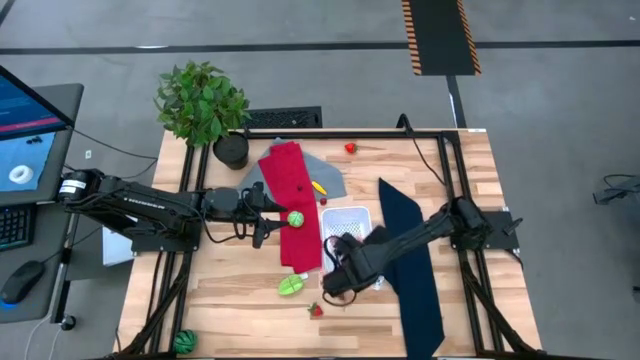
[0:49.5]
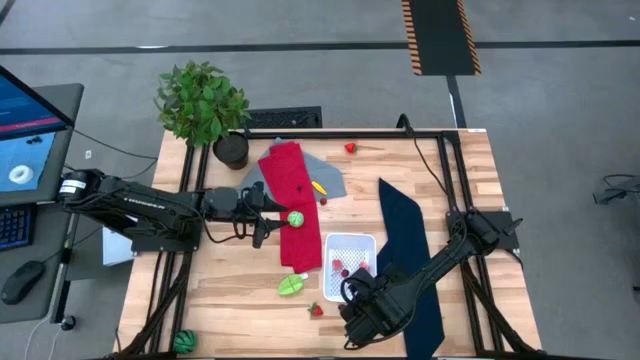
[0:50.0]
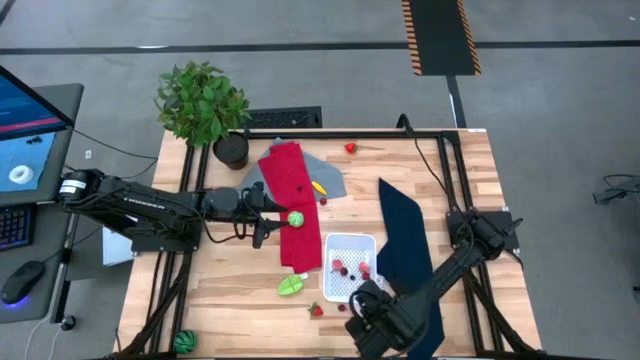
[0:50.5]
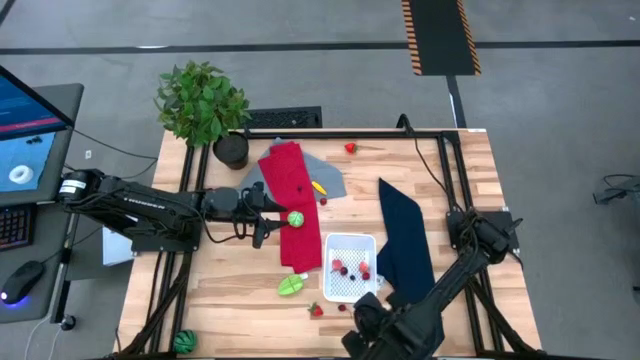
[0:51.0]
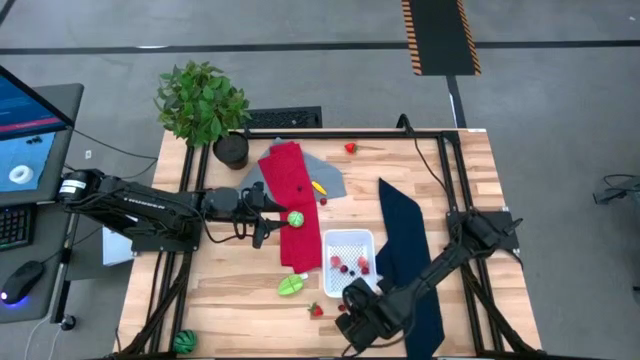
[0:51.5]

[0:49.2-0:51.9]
Task: Pick and placing Produce into tupperware
Adjust the white bin

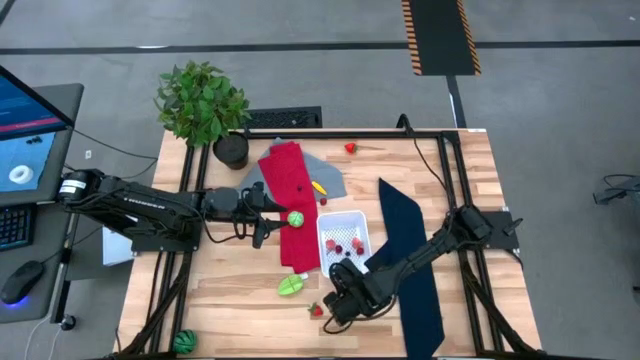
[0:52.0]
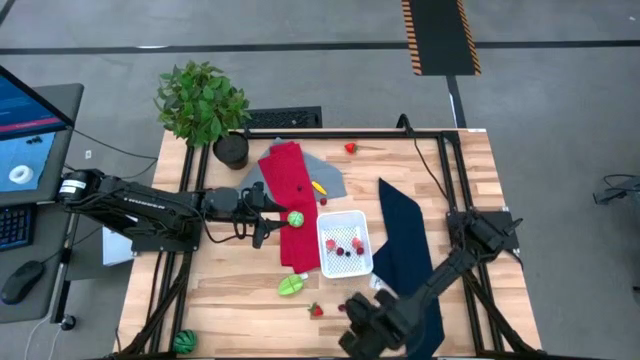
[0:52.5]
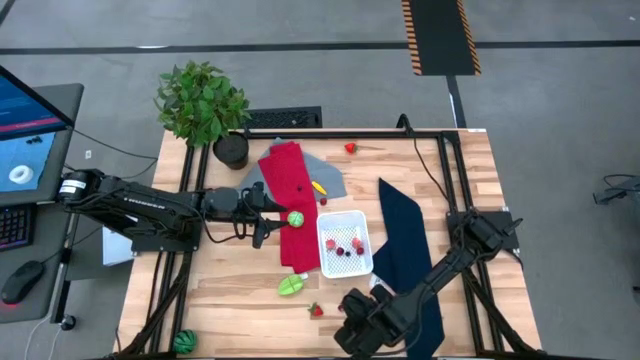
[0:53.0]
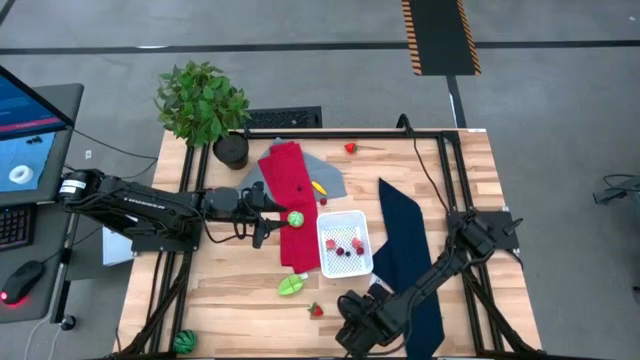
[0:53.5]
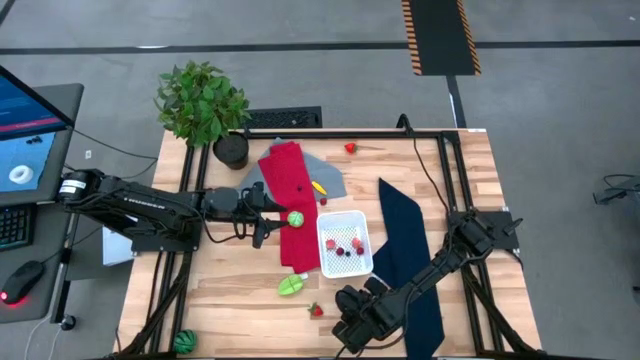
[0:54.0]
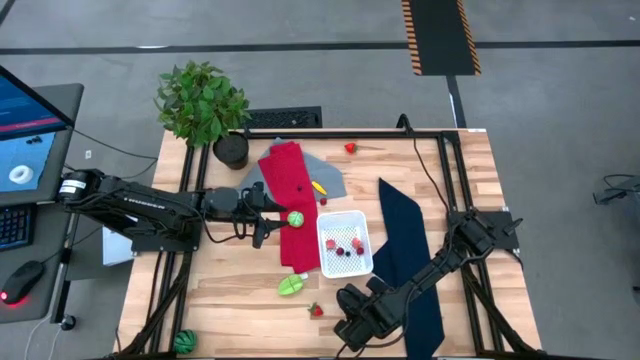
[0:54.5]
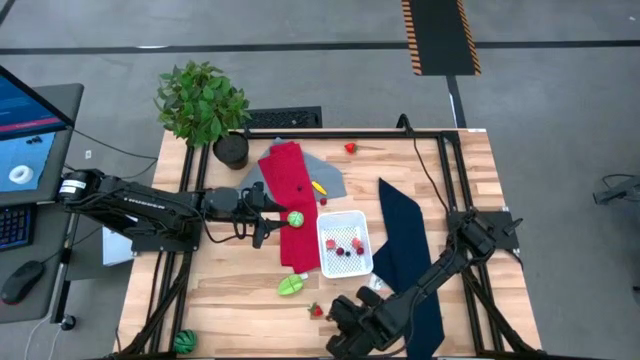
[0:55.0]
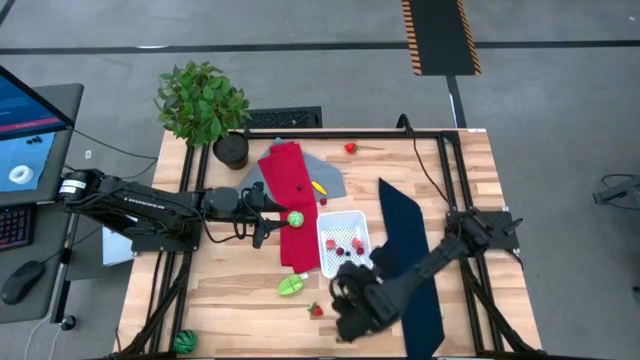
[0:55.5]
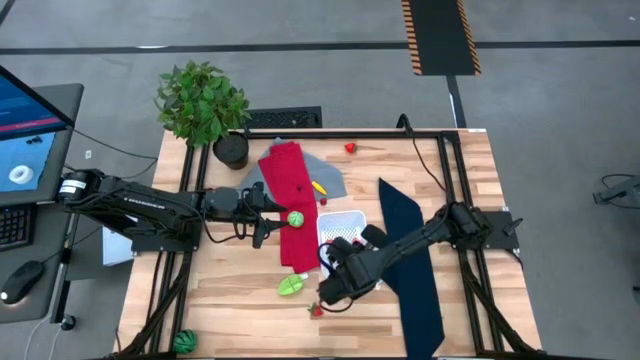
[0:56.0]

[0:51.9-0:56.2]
Put the cherry into the white bin

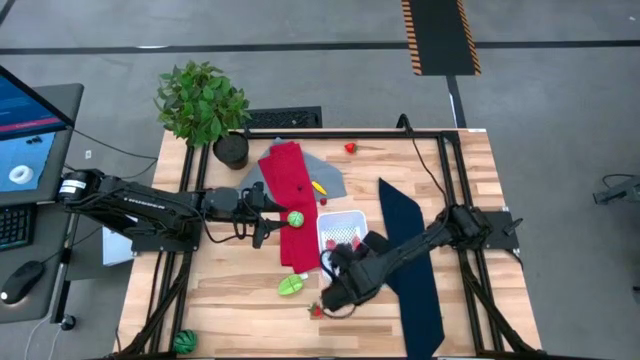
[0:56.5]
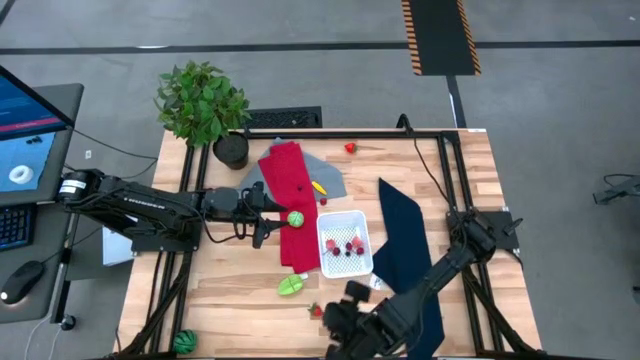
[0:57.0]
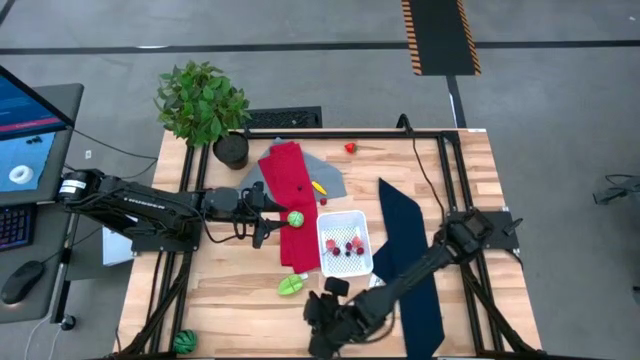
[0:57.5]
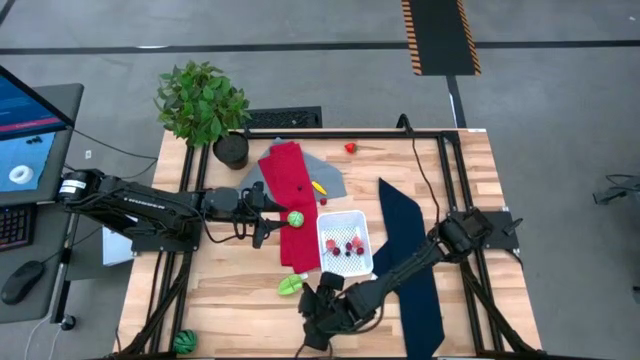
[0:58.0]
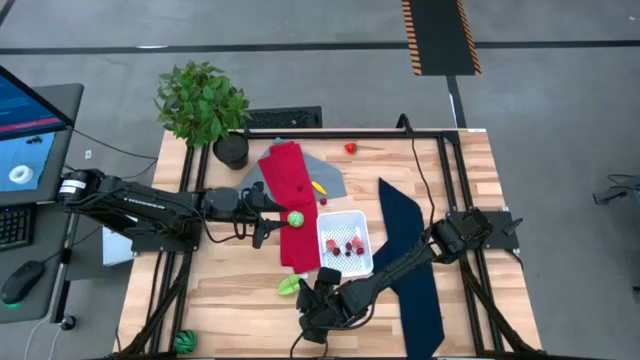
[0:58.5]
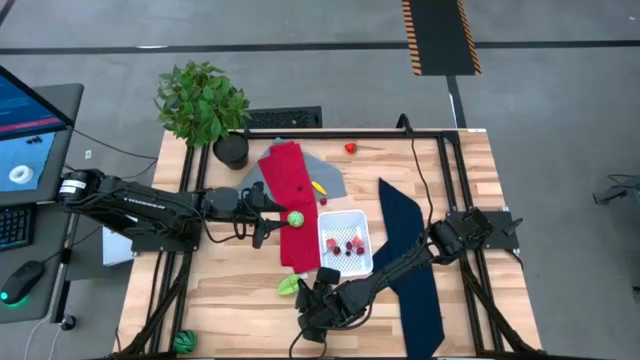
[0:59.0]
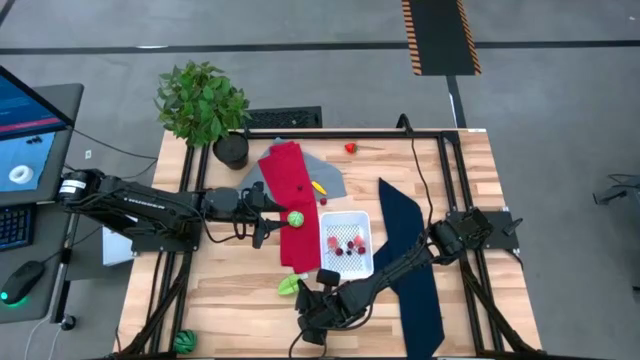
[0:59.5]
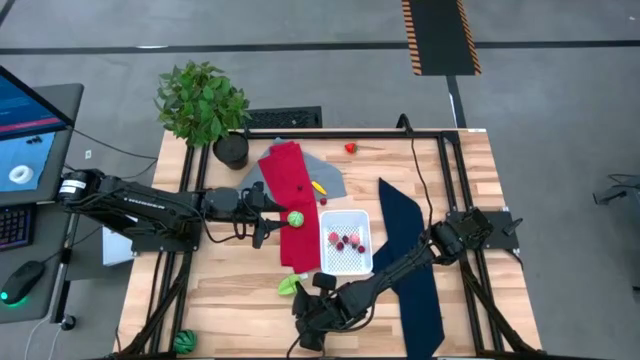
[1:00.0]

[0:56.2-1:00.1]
Put the strawberry into the white bin

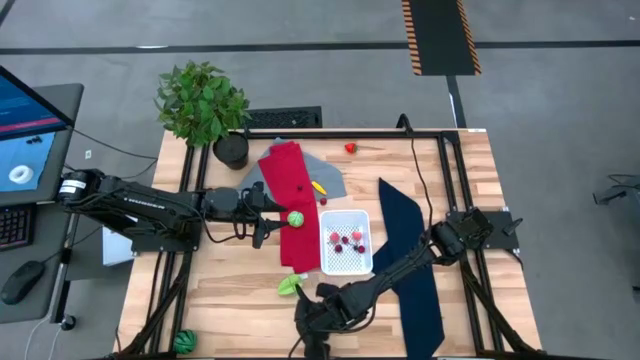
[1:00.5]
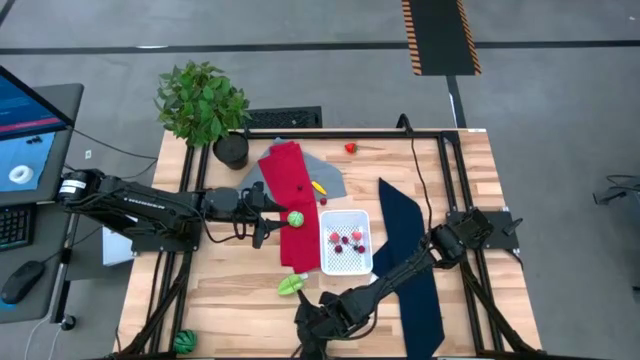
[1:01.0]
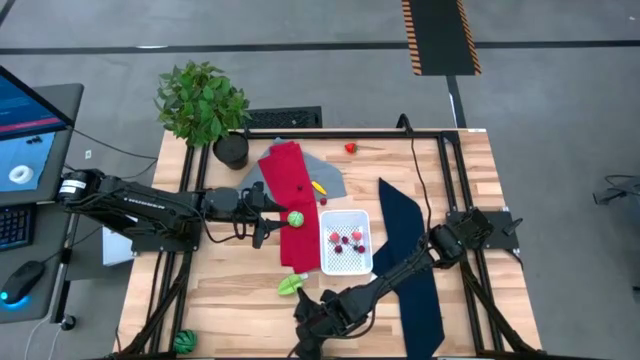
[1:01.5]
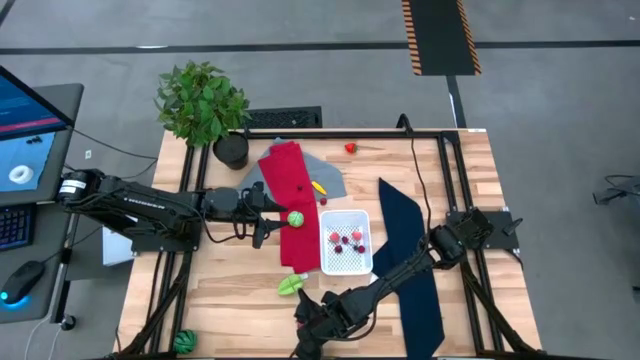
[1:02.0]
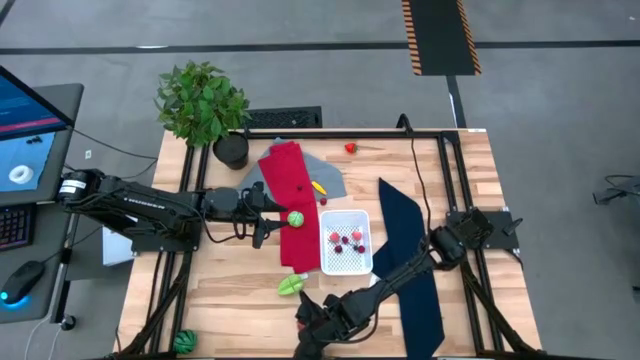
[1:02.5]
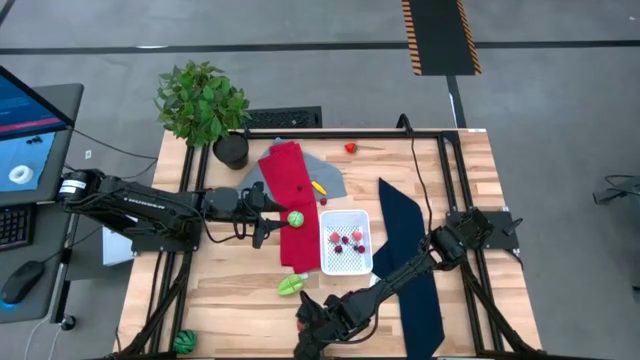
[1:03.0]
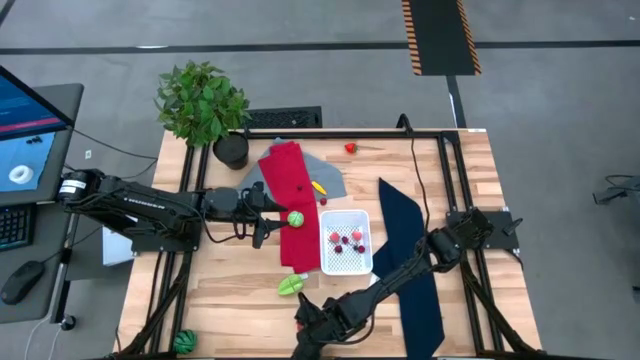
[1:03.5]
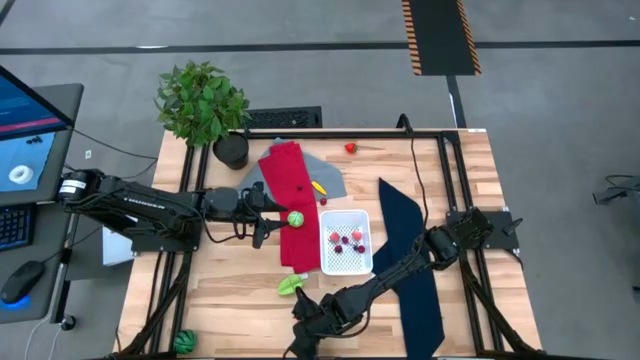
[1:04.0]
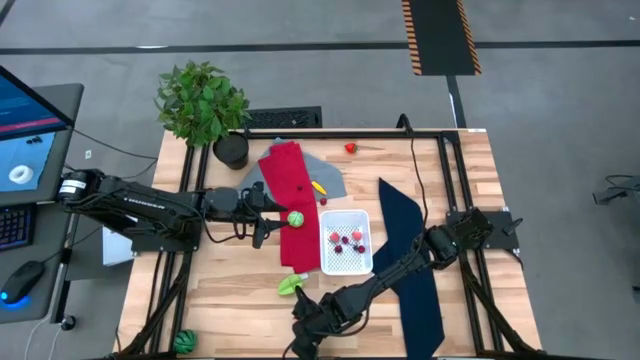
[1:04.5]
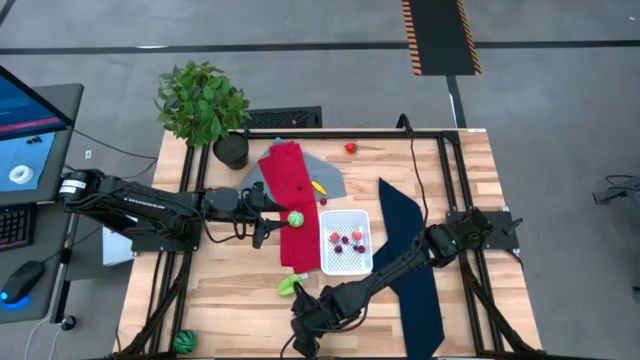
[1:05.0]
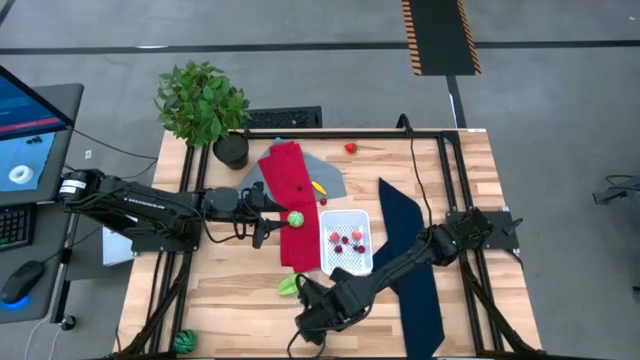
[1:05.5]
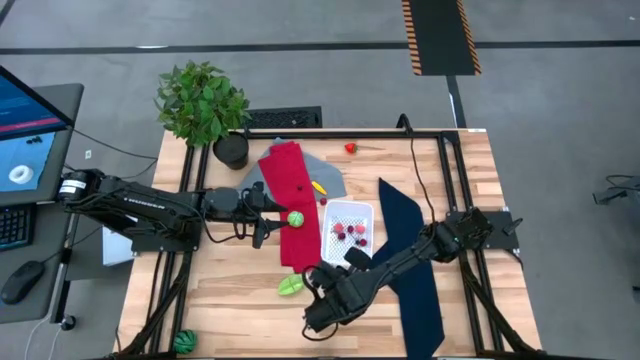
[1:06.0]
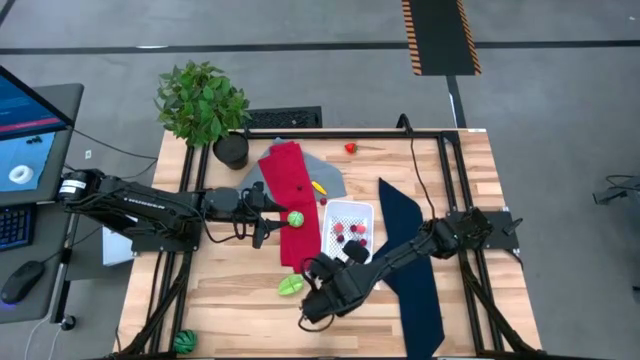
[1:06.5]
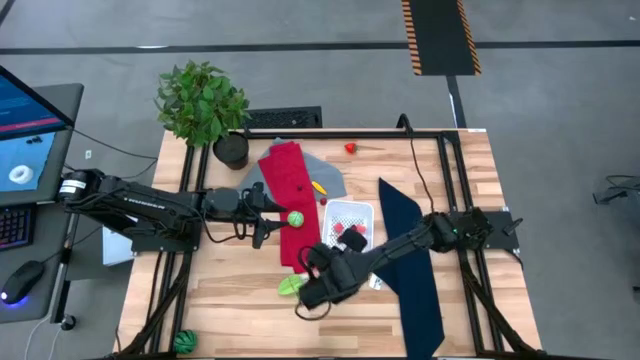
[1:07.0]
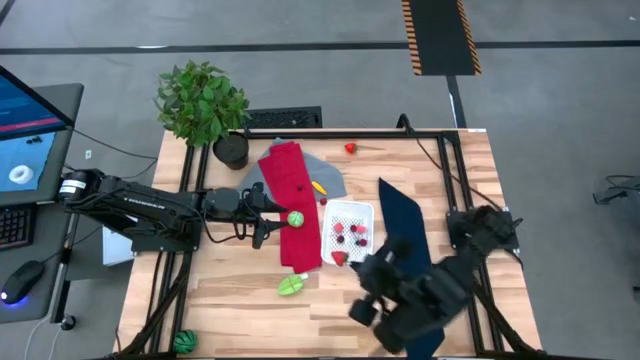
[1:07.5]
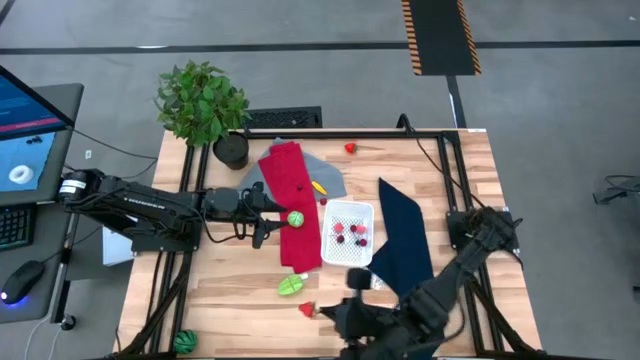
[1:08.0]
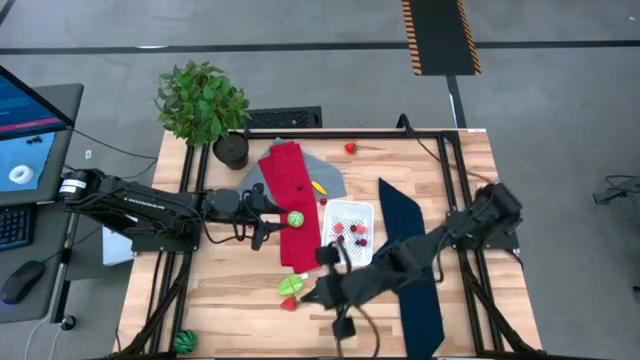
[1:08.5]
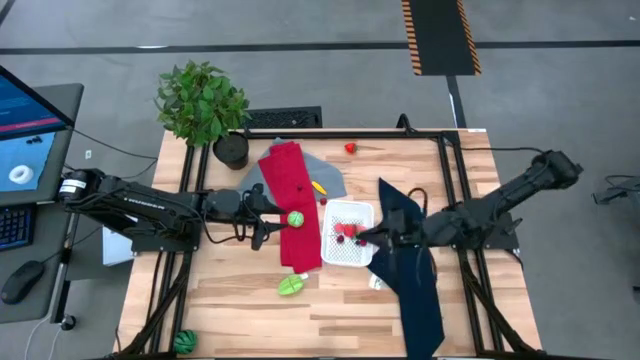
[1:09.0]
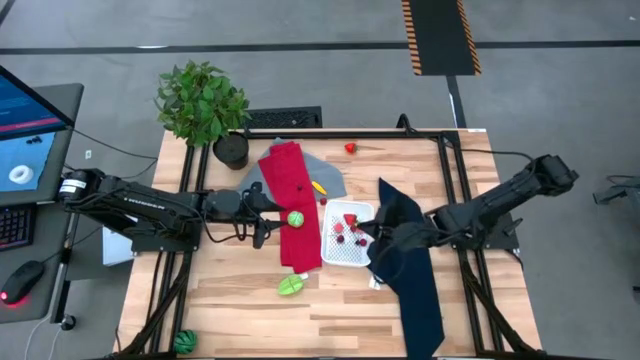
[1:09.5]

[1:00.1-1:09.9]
Put the strawberry into the white bin

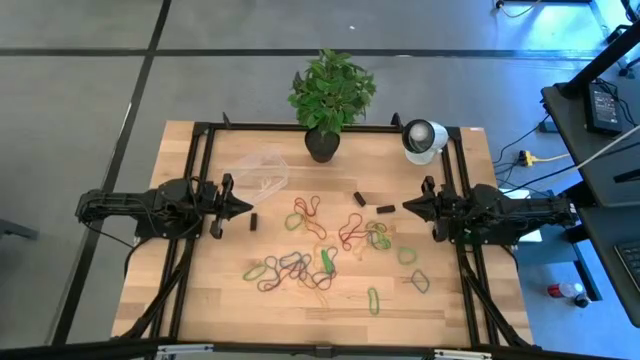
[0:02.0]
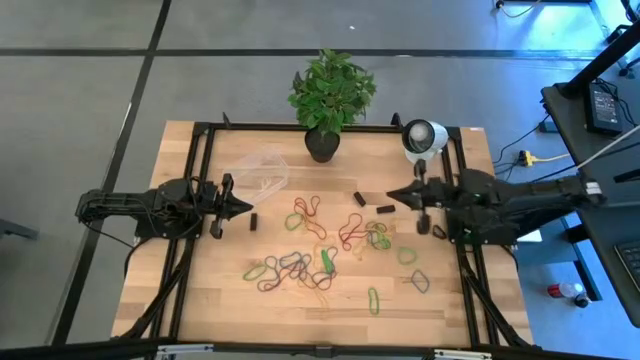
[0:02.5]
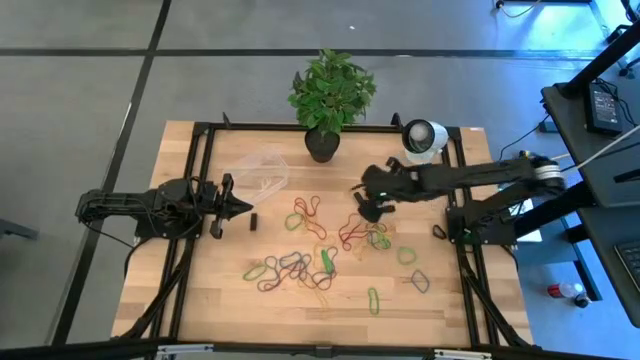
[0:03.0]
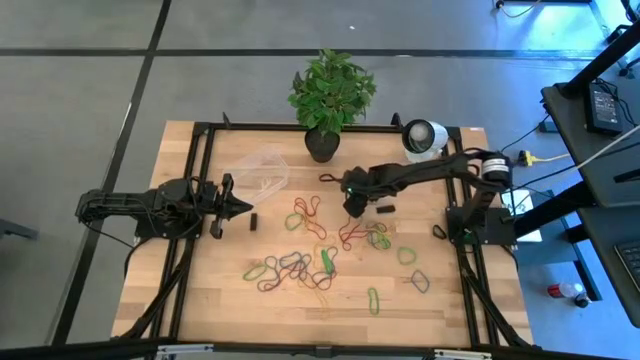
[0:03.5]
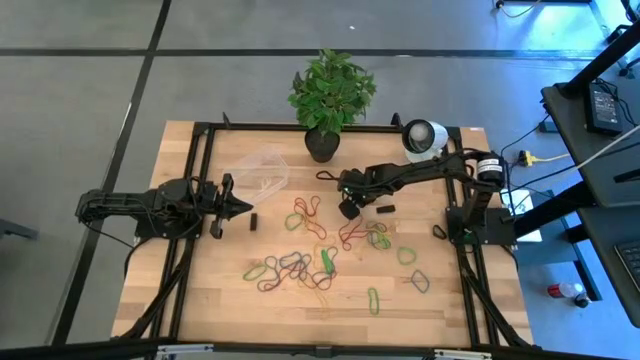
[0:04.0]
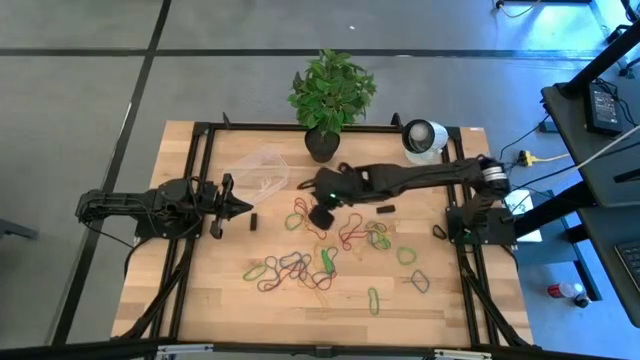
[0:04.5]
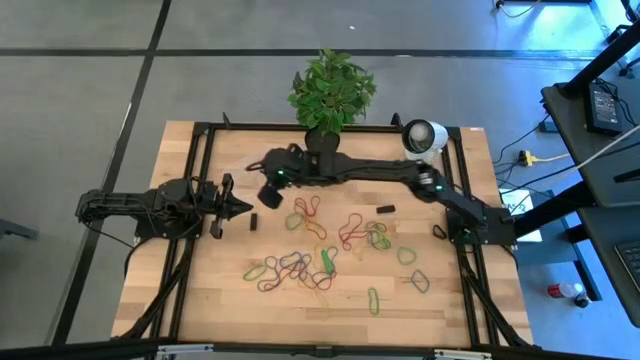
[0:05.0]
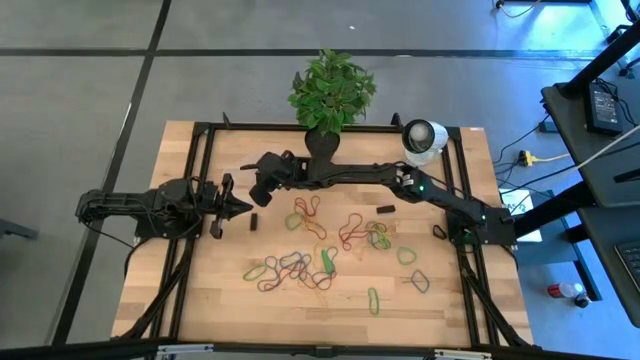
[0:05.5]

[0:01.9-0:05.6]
Task: Pick and place rubber bands into bin
Put the black rubber band into the transparent bin
